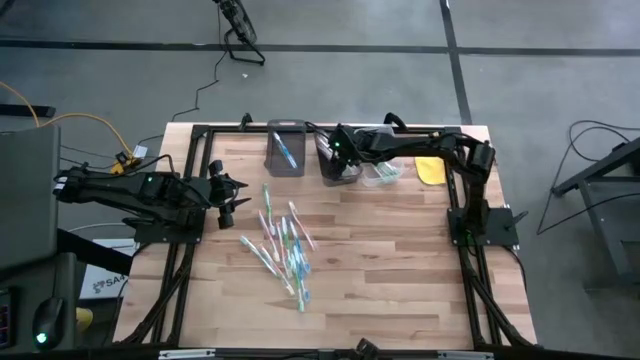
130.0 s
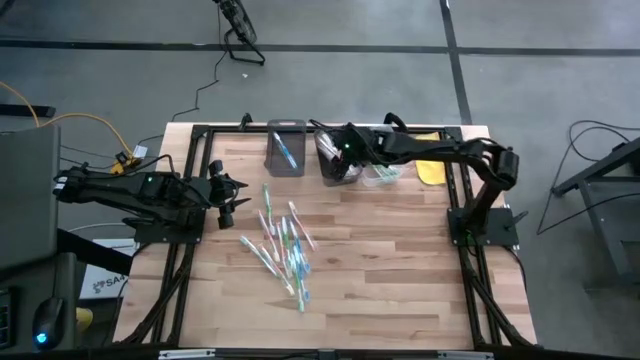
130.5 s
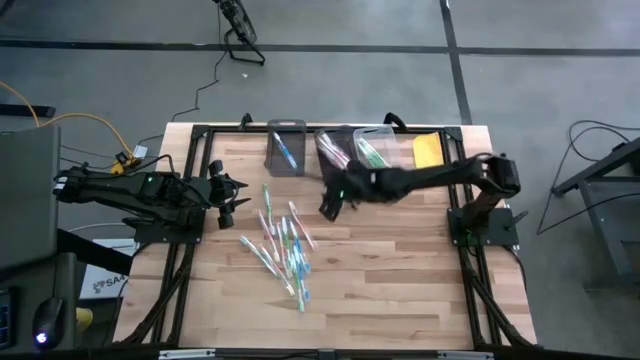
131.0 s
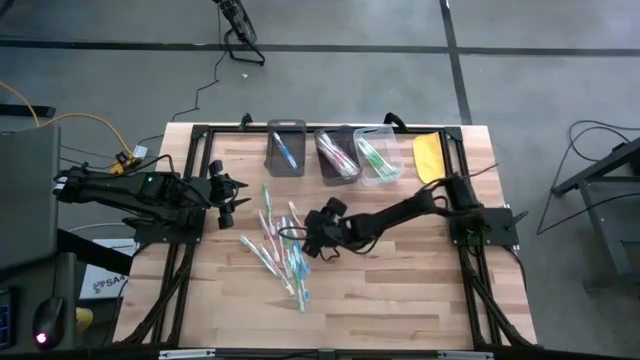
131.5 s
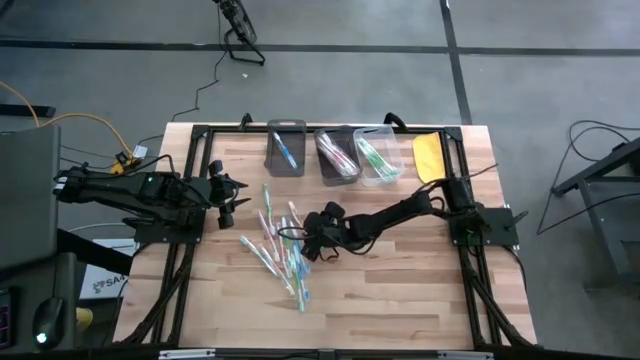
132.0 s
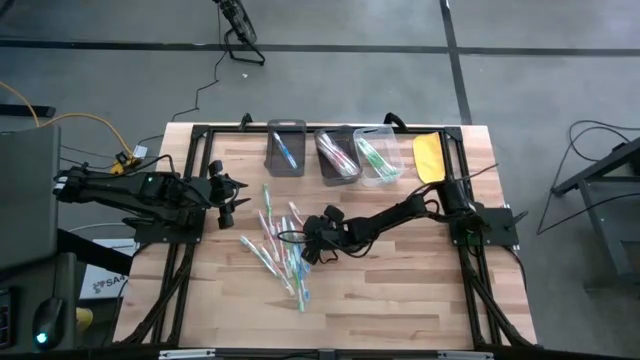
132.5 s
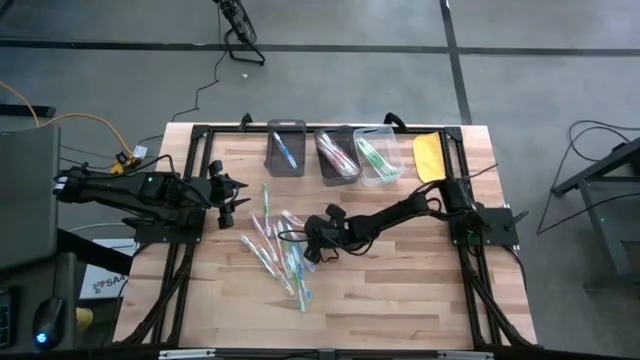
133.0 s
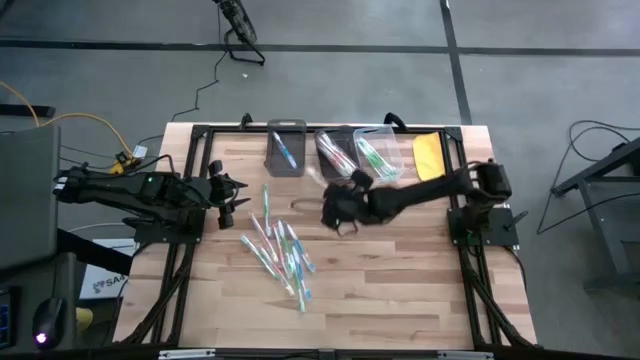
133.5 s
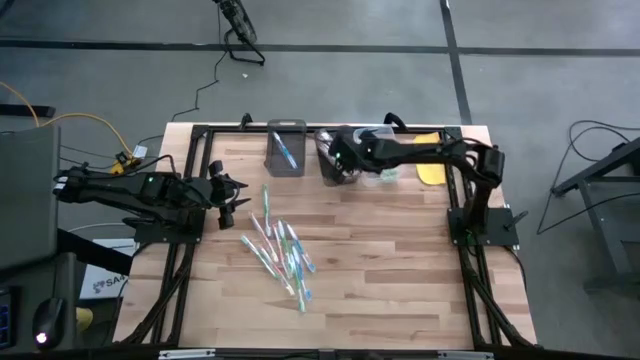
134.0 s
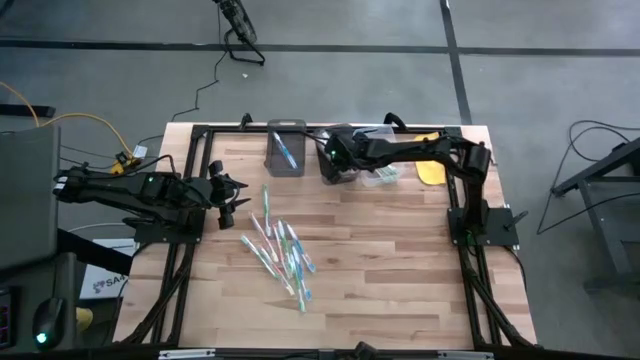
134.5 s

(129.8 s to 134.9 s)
Task: Pick & Place Toothbrushes
Put the orange toothbrush into the right black bin

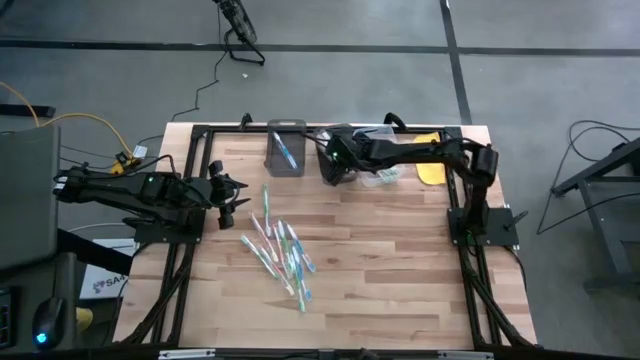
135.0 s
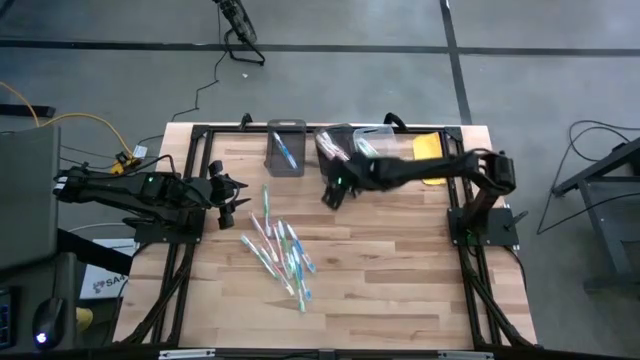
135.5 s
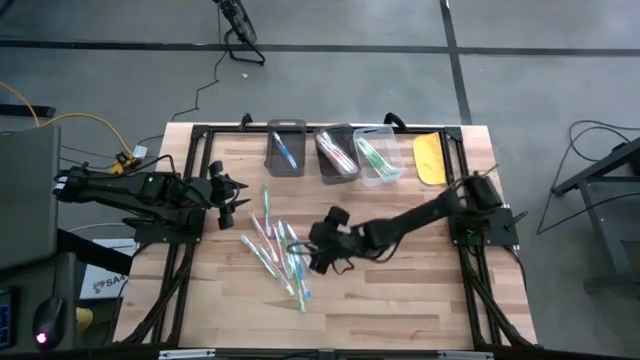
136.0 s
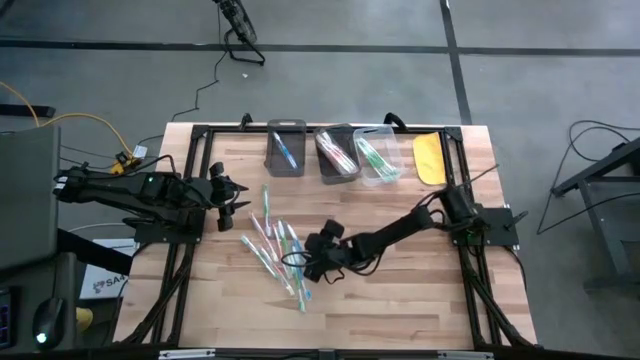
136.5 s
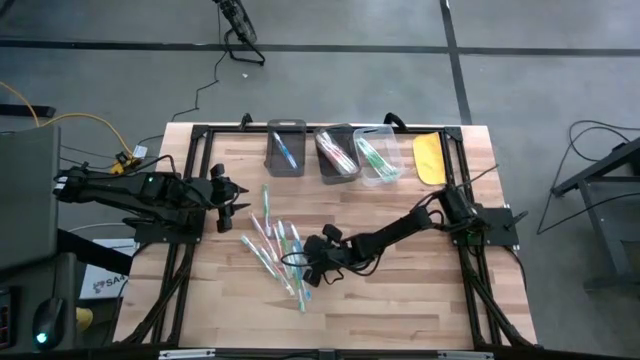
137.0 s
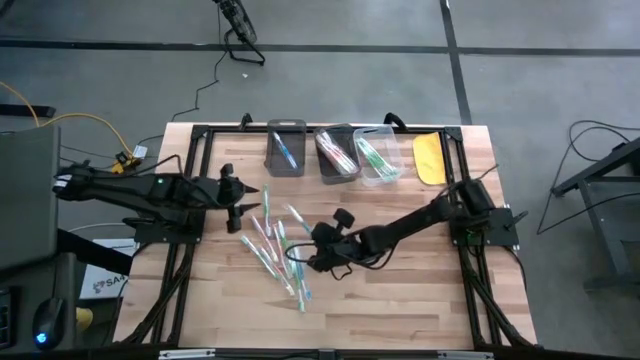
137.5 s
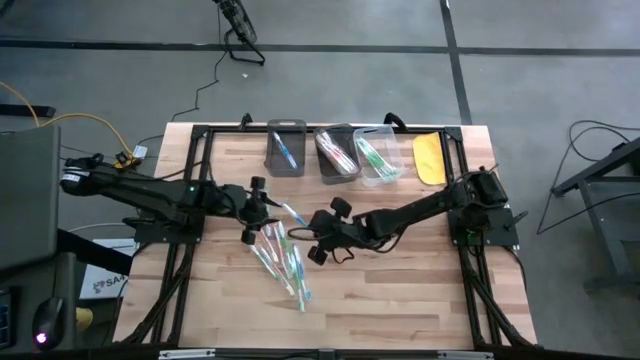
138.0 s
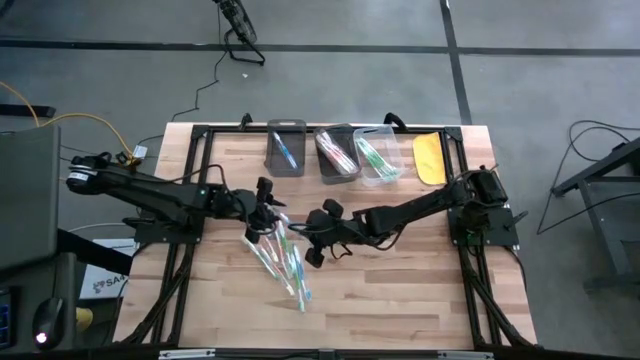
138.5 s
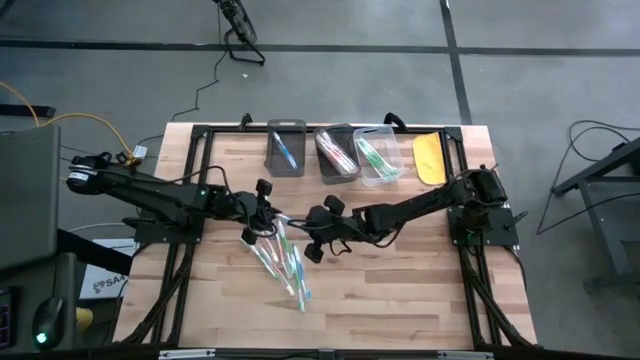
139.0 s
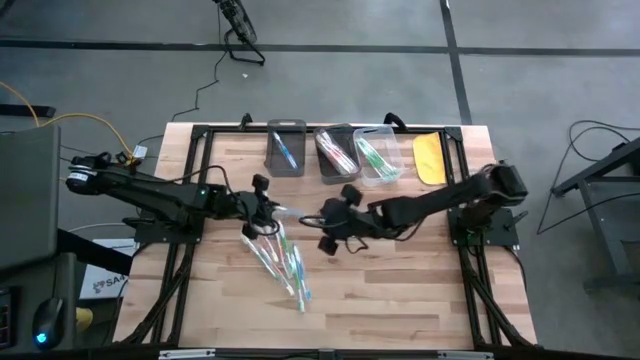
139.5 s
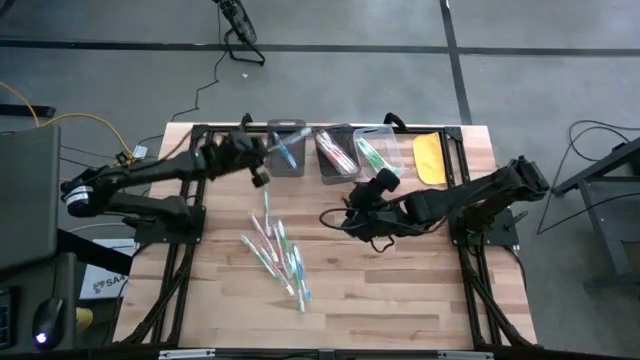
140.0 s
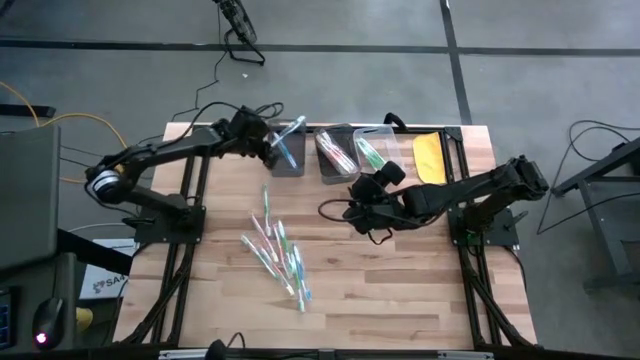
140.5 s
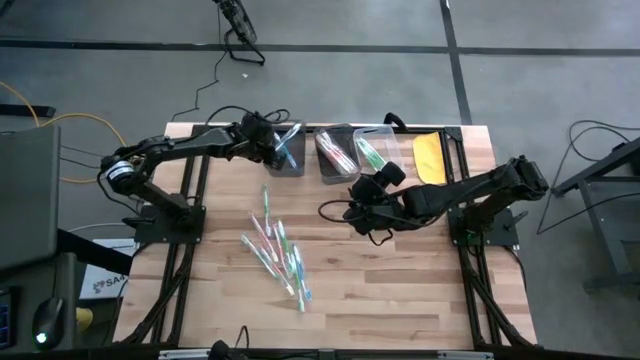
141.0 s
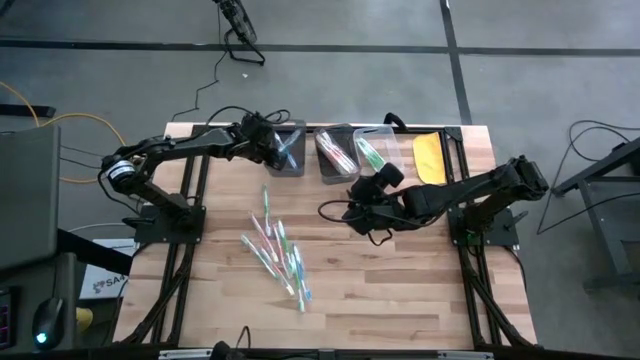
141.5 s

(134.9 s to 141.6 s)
Put the blue toothbrush into the left black bin

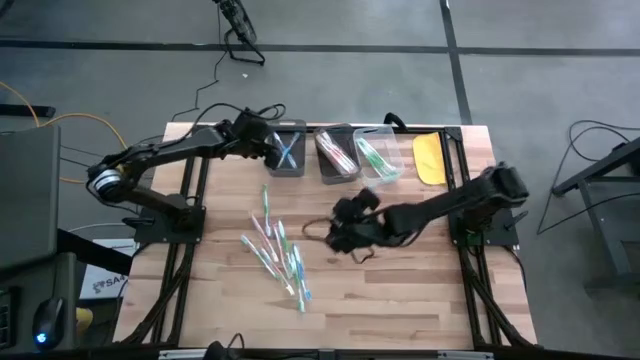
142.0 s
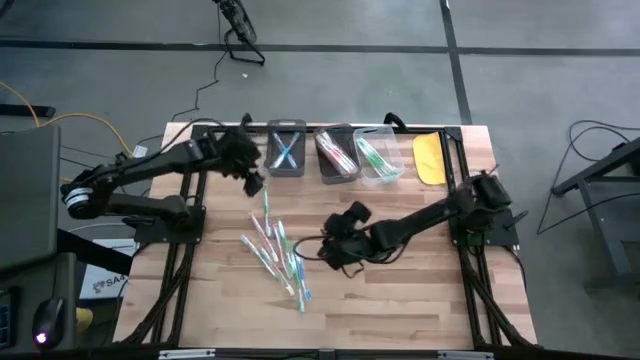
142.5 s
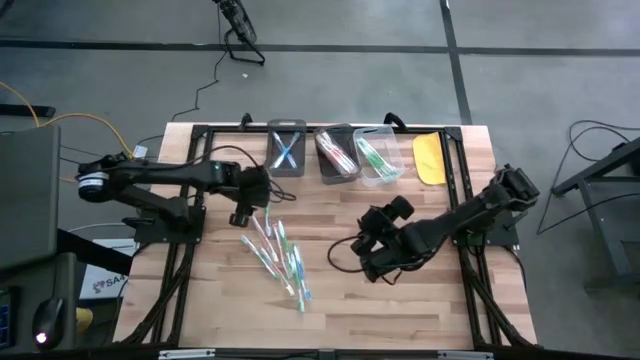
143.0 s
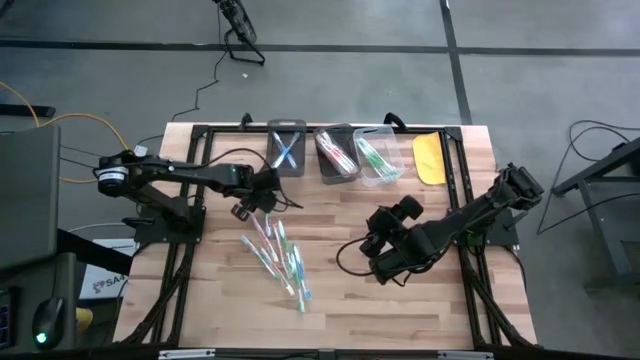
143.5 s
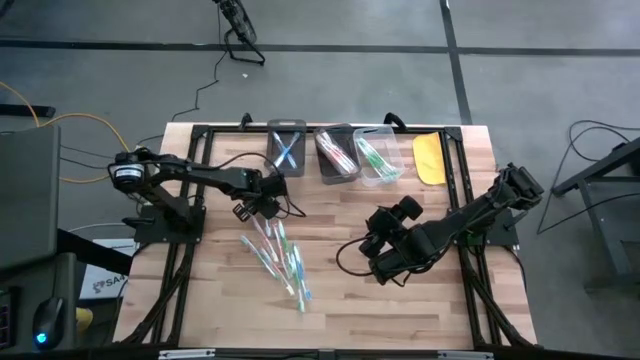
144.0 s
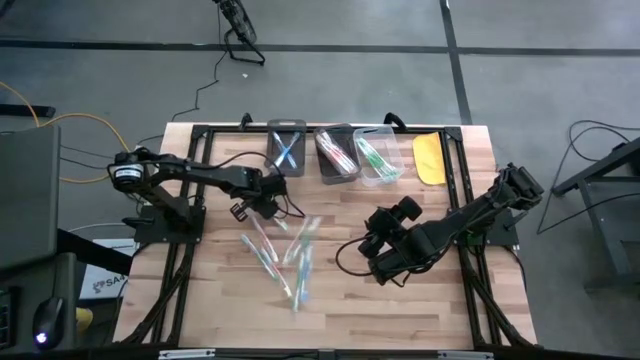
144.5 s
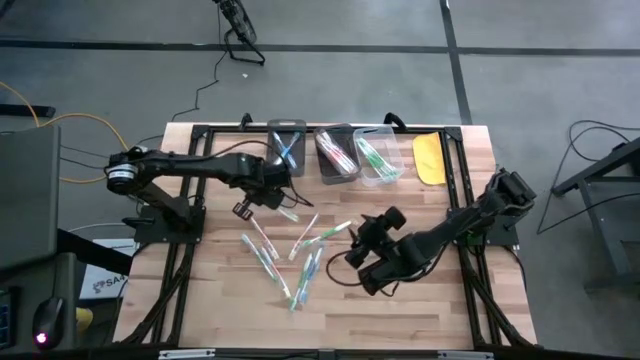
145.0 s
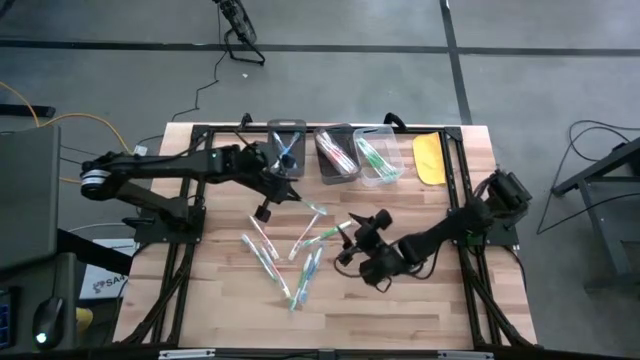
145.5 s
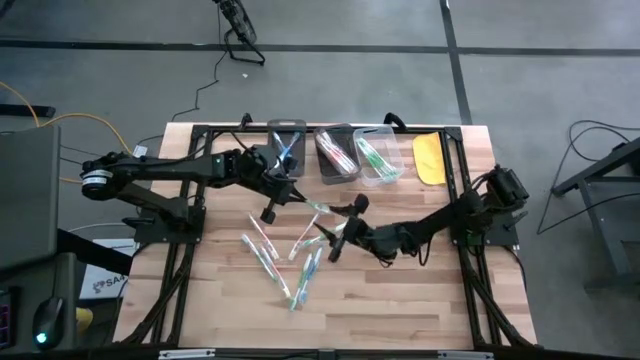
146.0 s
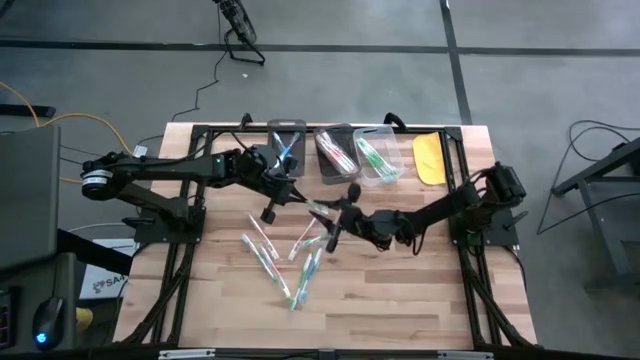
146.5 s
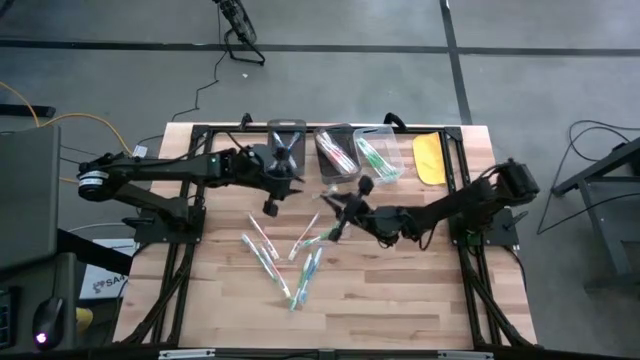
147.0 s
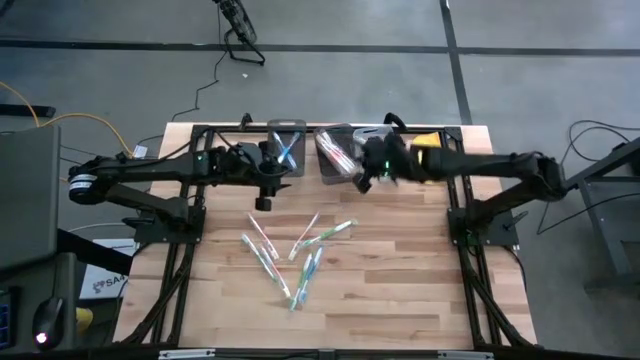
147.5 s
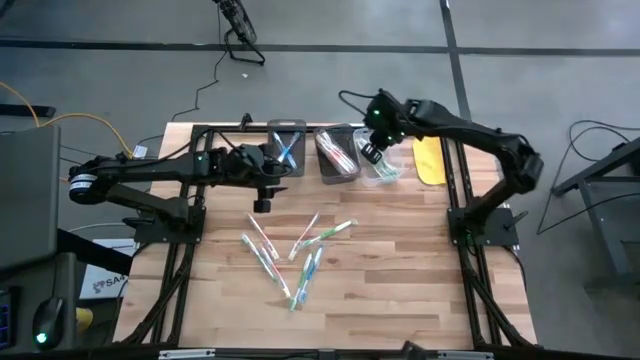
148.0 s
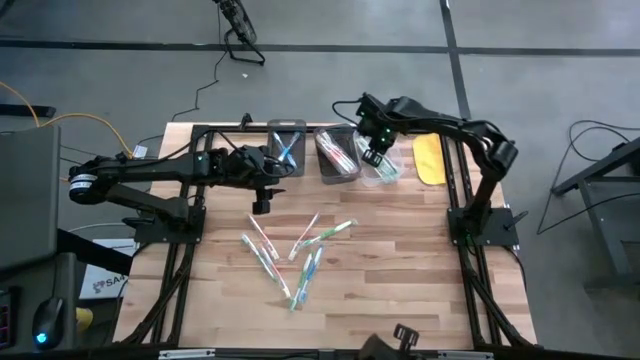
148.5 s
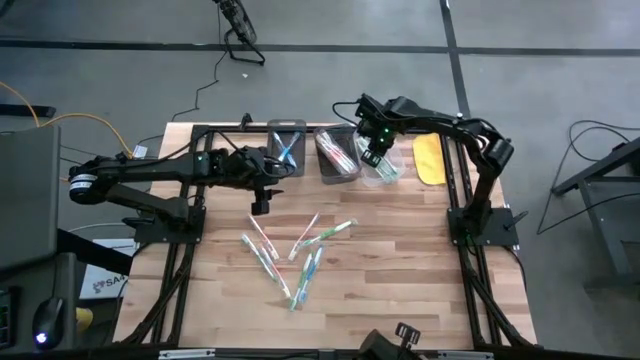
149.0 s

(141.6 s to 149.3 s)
Put the green toothbrush into the transparent bin

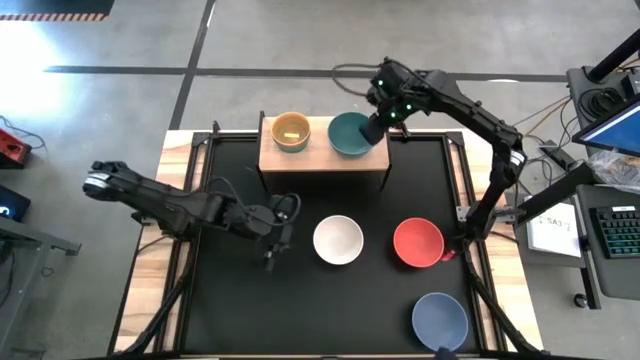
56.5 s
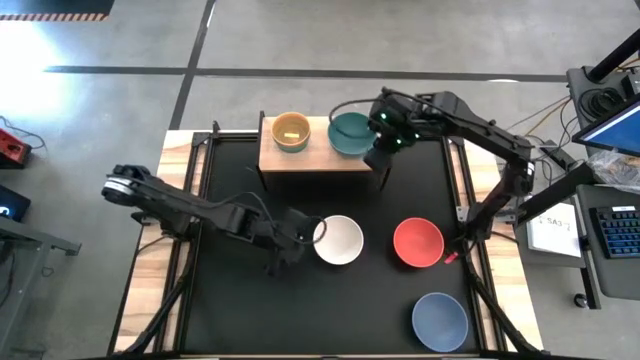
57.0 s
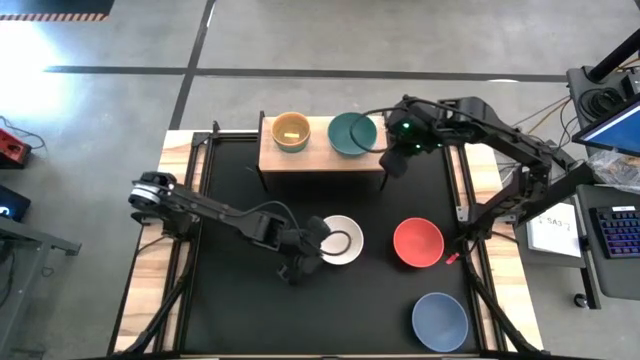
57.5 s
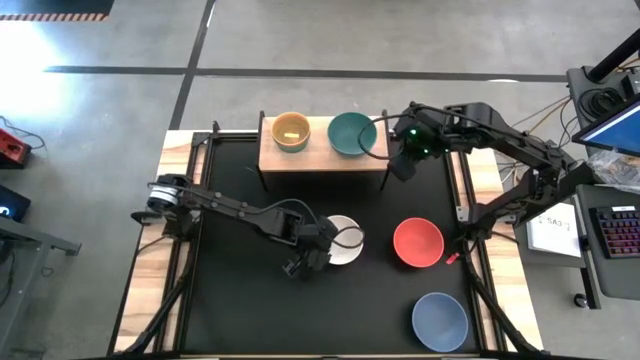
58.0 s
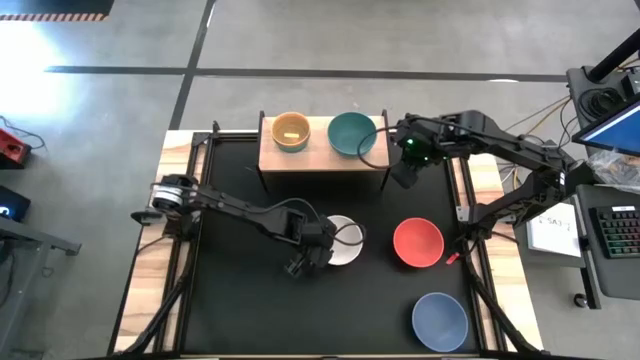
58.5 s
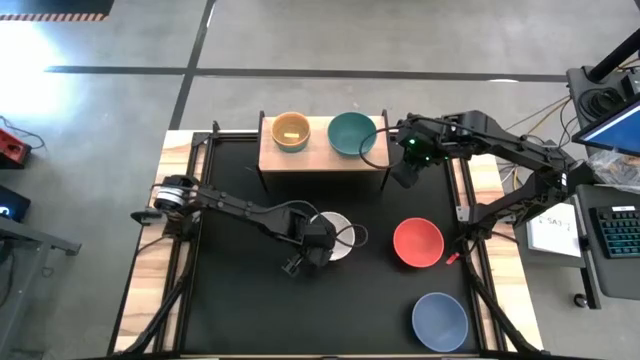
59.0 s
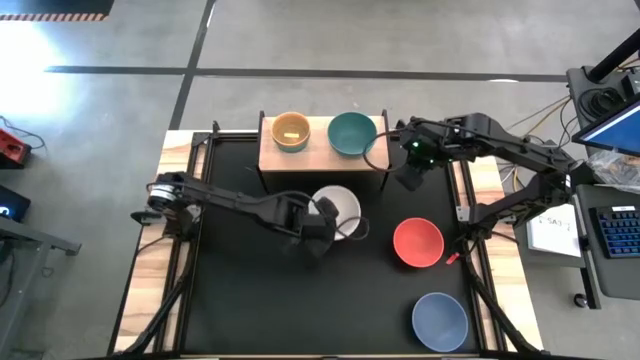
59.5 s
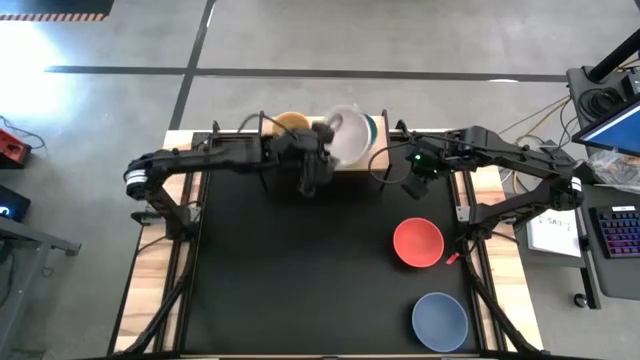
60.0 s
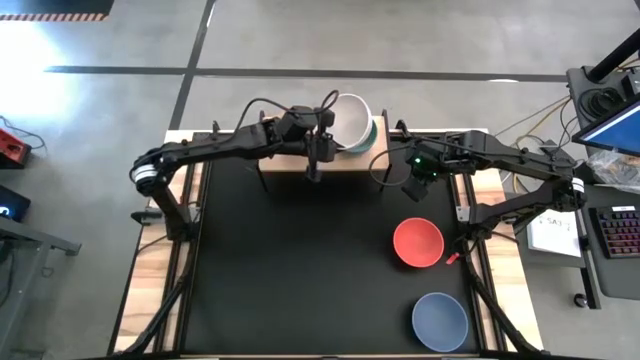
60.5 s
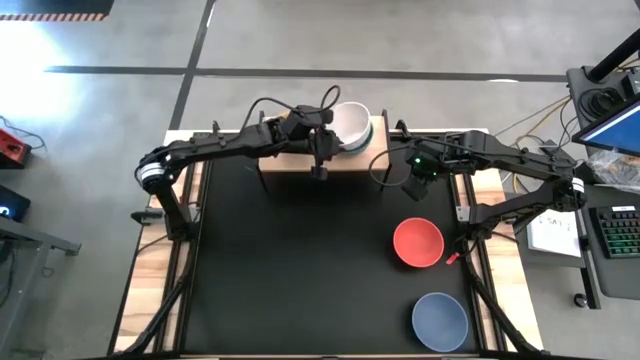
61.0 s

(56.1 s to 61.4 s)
Task: Place and stack bowls onto a shelf
Stack the large white bowl on top of the large green bowl on the shelf
